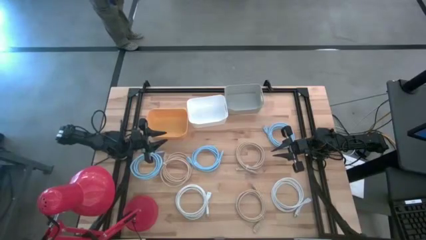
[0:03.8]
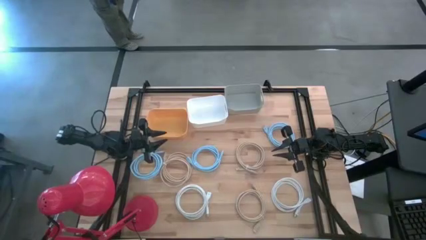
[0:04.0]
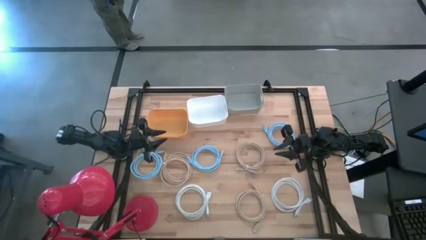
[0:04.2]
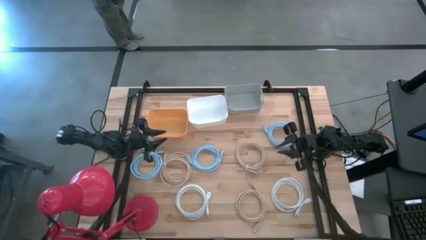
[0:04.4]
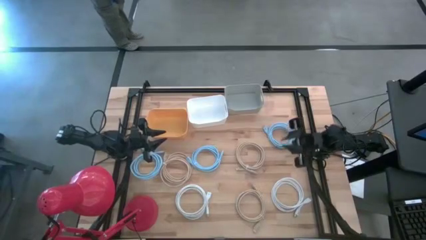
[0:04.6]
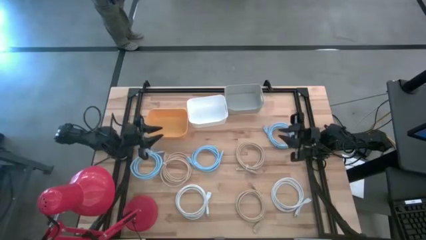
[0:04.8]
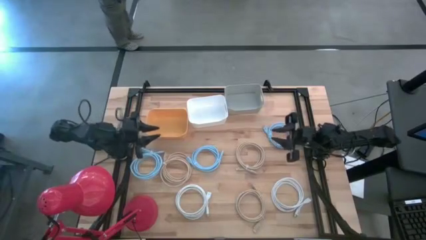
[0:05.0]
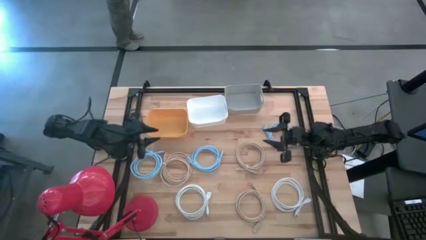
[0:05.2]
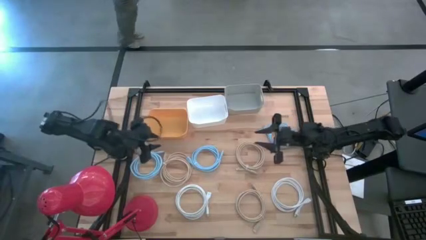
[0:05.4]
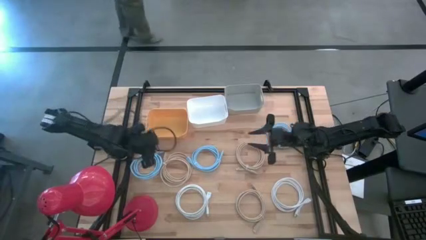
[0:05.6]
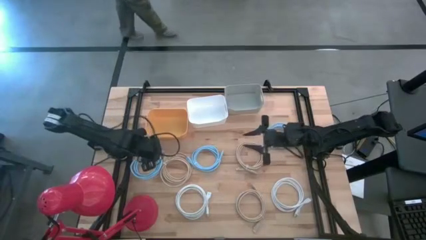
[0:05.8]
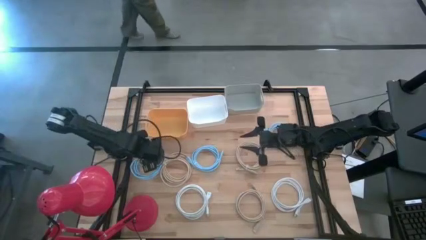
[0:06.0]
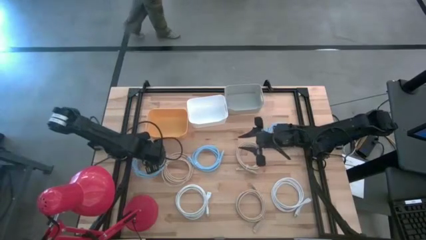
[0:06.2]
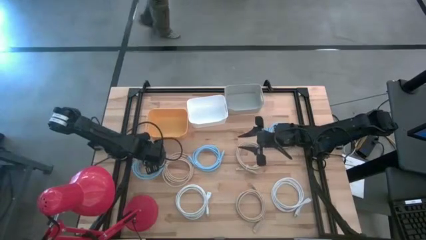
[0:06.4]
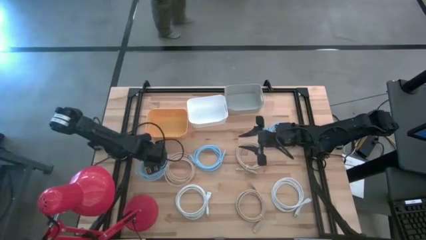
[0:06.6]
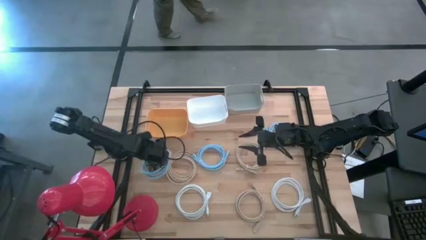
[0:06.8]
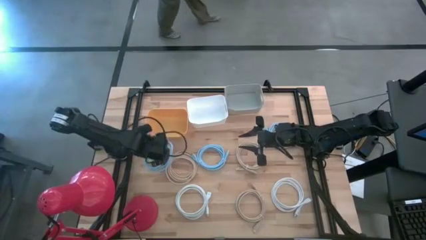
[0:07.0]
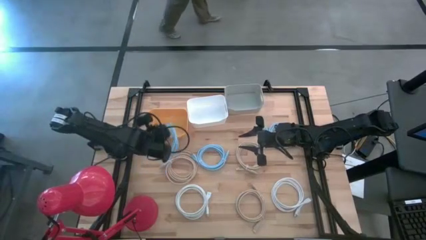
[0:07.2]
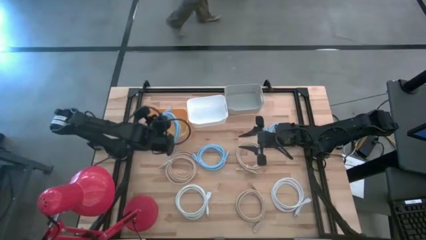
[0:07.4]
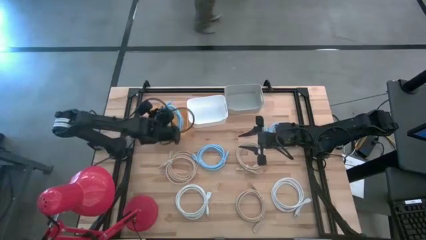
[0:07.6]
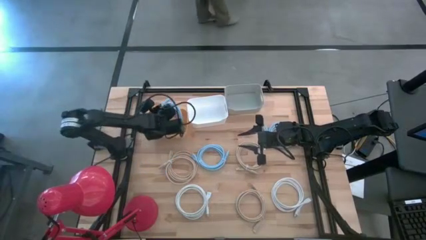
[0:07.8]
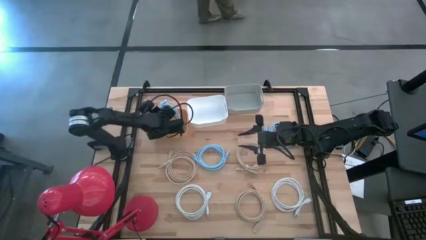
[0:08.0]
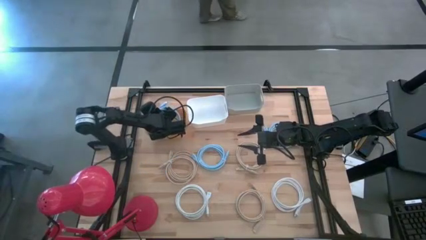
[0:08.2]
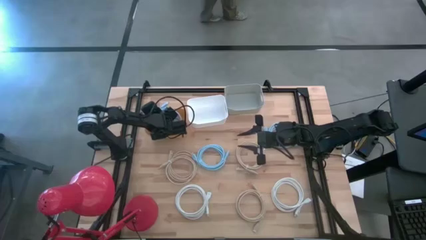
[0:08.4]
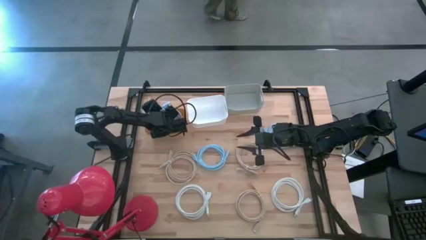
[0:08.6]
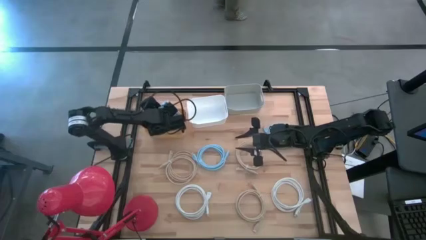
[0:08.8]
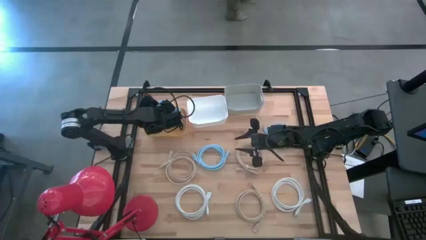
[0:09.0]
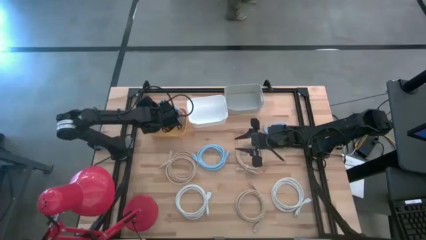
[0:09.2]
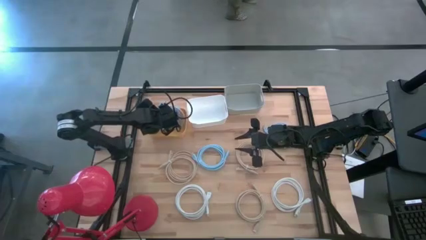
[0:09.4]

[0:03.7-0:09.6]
Task: Sort HDMI cables
Put the left blue HDMI cable into the orange bin

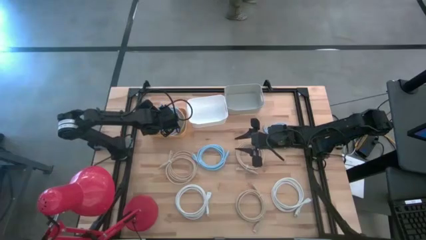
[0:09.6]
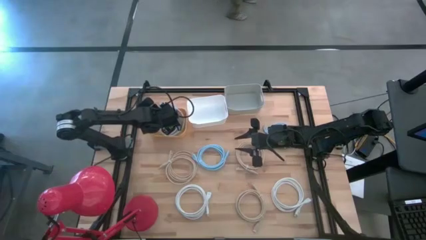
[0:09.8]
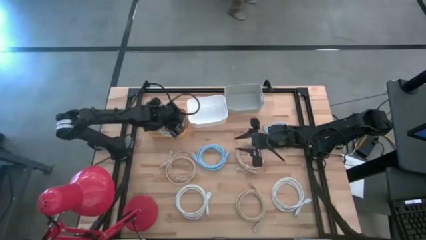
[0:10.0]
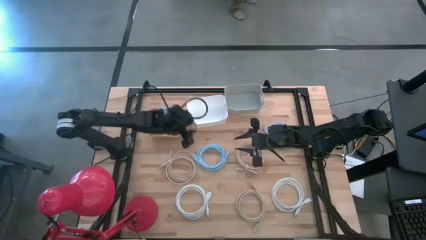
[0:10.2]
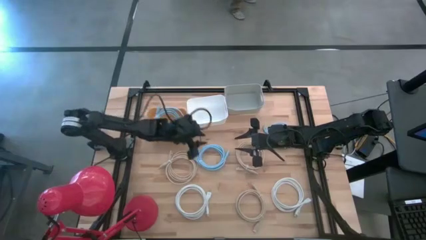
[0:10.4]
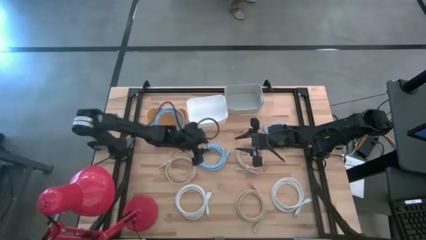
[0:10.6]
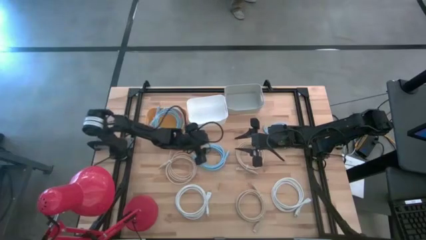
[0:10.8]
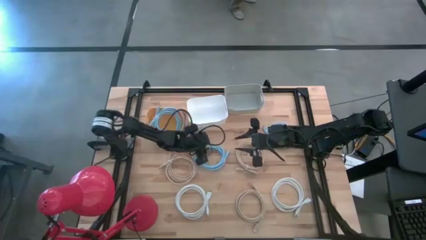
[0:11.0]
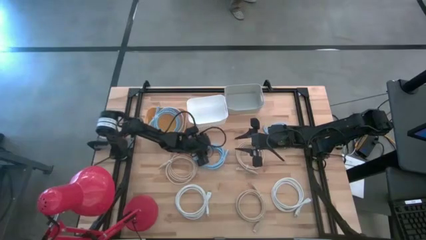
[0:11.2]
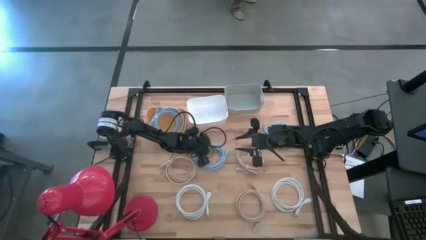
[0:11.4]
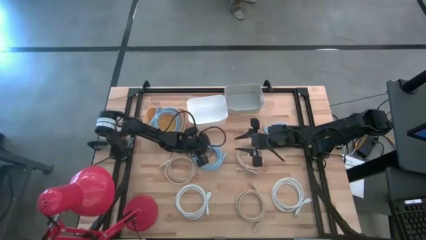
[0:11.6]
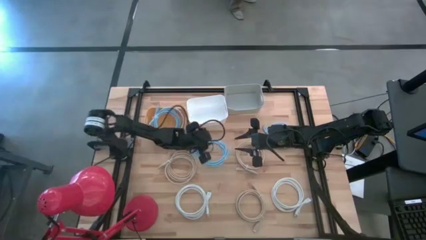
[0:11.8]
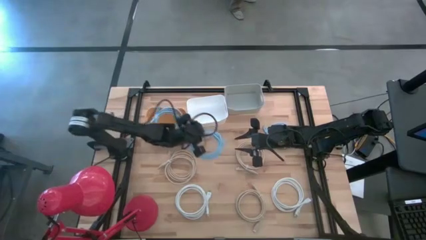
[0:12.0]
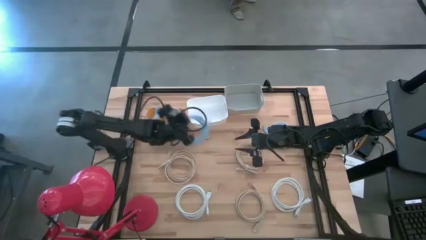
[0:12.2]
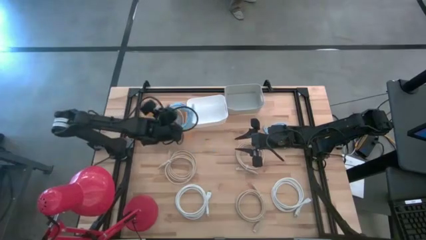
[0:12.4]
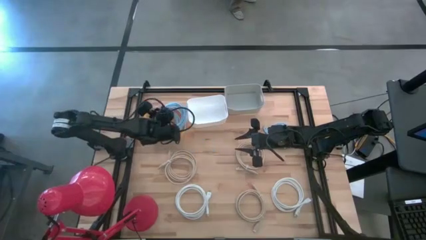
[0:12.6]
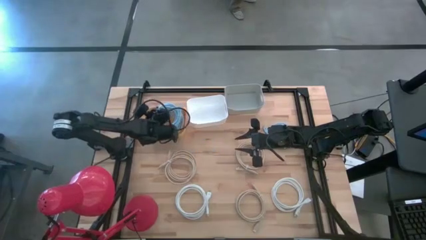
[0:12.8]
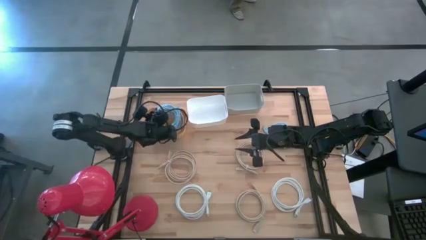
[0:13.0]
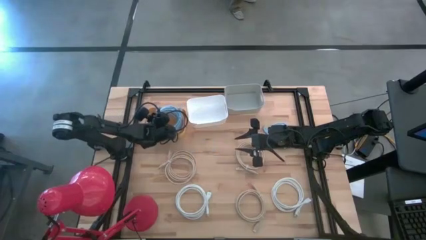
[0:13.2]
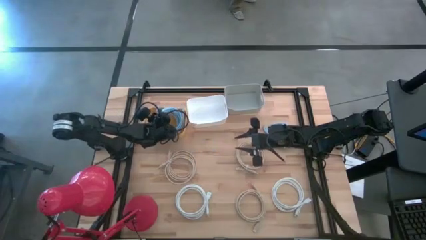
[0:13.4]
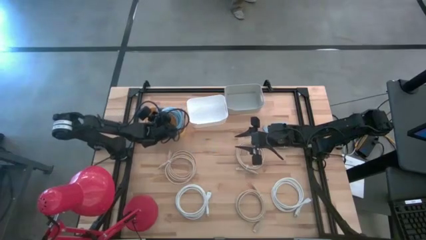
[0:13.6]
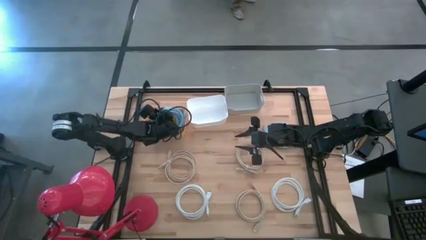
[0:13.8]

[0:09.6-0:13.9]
Put the left blue HDMI cable into the orange bin

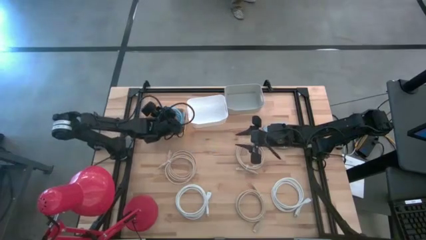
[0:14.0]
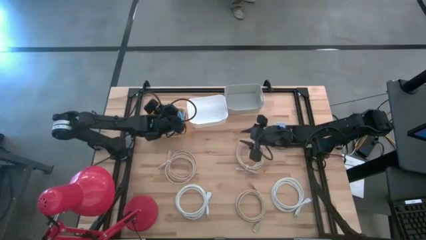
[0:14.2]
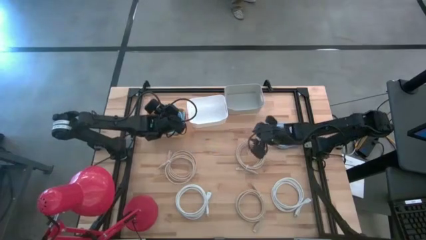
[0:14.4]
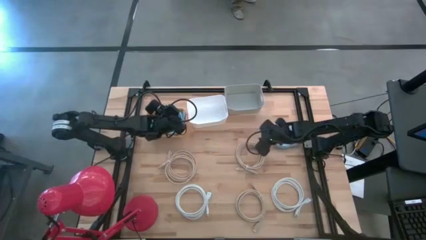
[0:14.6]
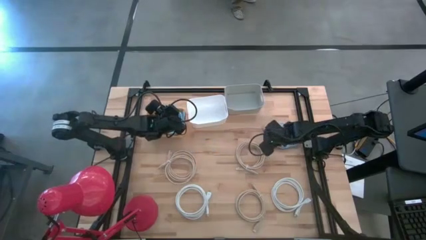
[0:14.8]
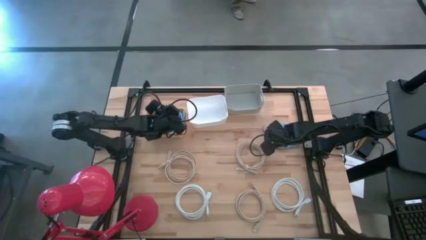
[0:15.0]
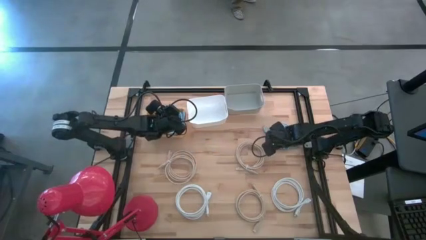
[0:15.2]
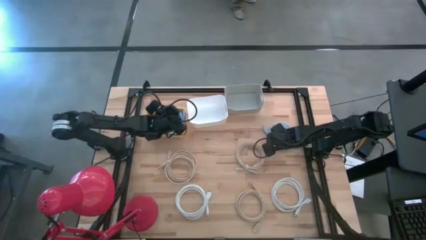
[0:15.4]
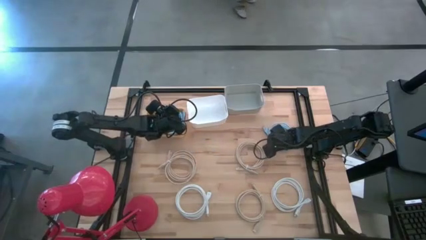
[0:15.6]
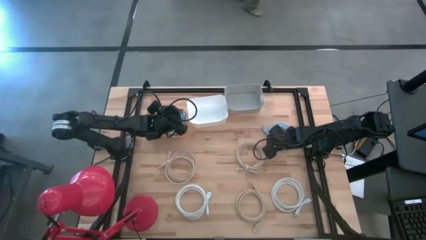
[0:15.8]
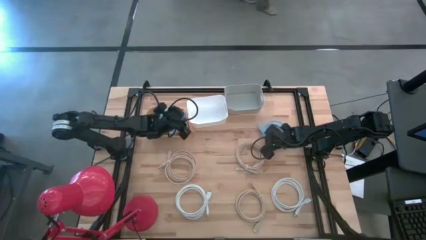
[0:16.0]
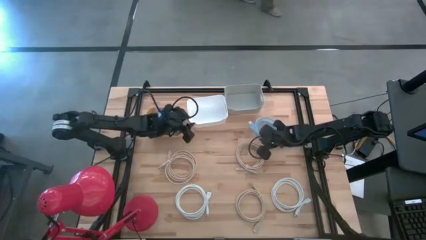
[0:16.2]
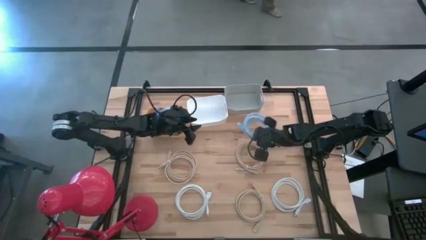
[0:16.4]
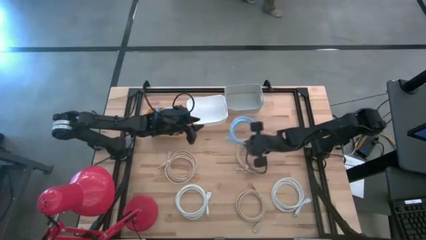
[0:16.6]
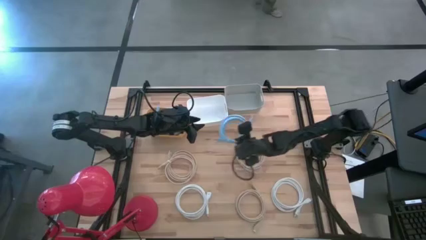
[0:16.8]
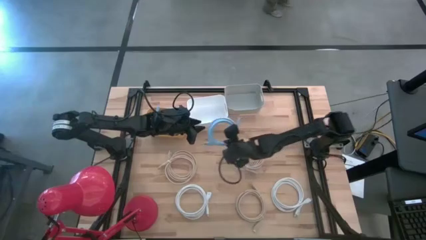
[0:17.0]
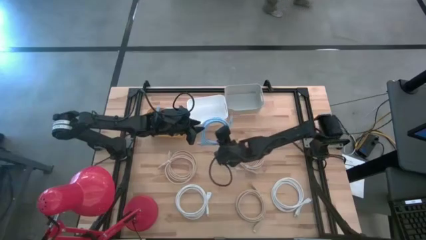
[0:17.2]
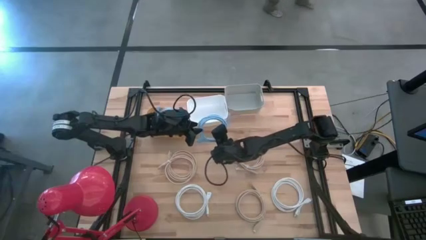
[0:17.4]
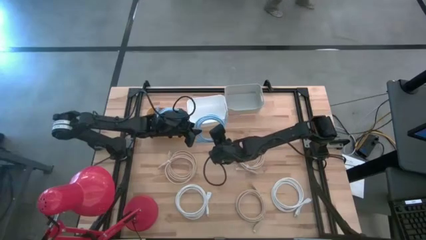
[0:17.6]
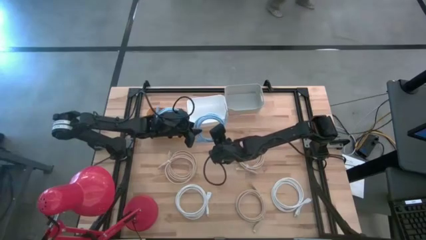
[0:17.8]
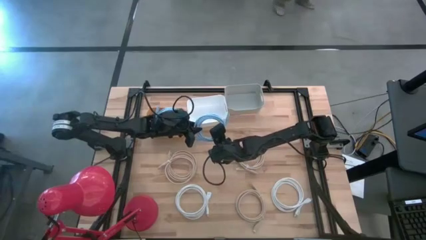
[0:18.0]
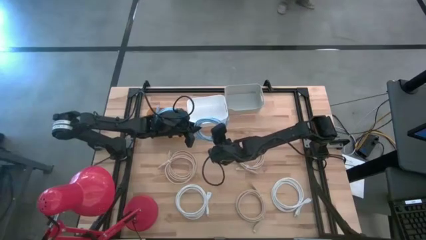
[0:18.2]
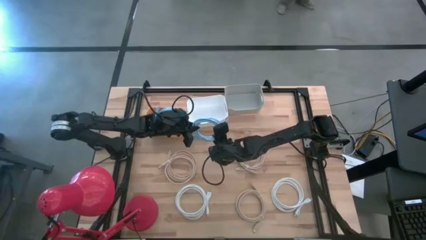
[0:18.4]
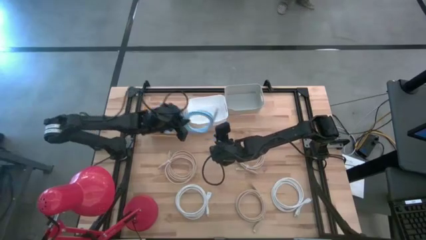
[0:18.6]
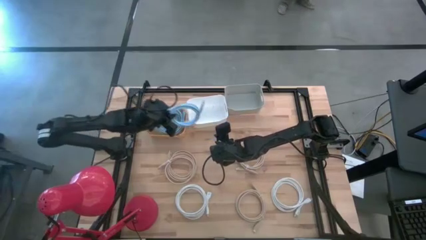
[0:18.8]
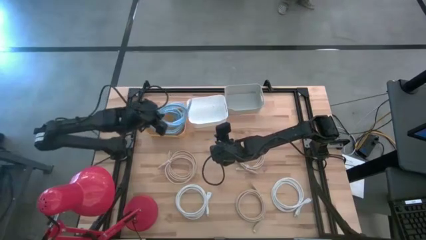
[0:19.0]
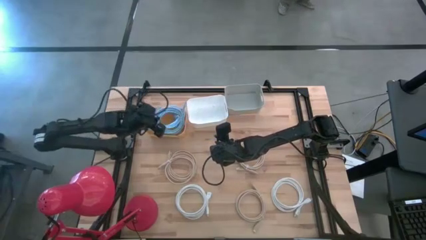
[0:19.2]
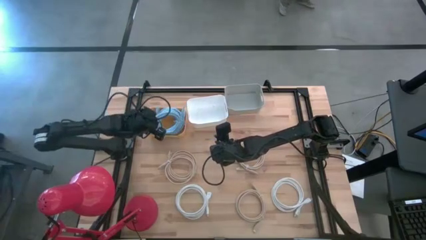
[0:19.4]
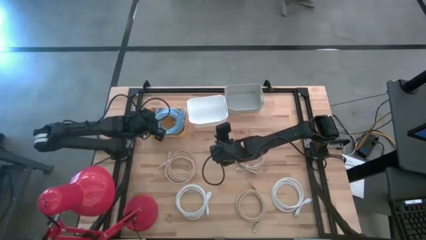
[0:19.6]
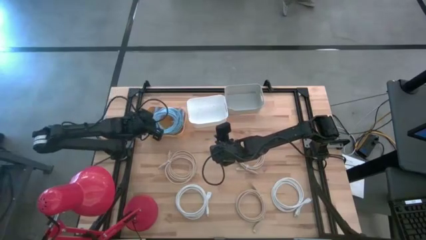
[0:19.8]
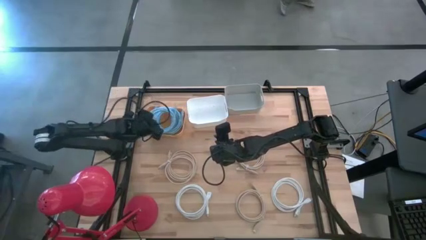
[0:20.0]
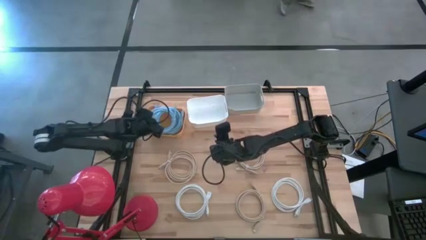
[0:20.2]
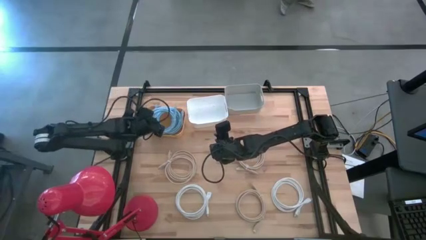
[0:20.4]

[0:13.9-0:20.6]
Put the blue HDMI cable into the orange bin
